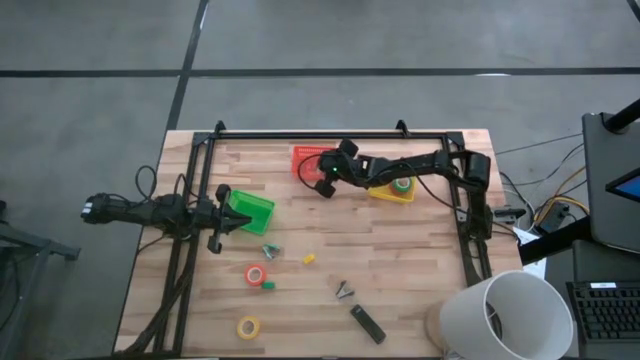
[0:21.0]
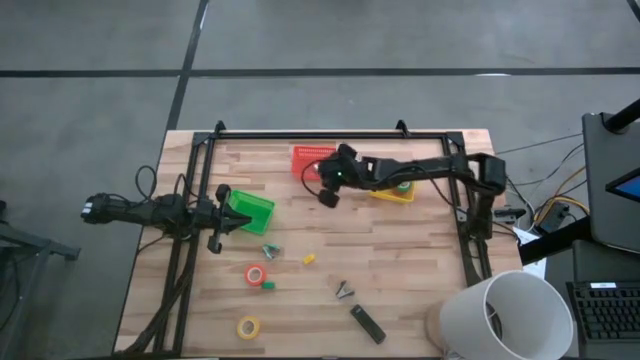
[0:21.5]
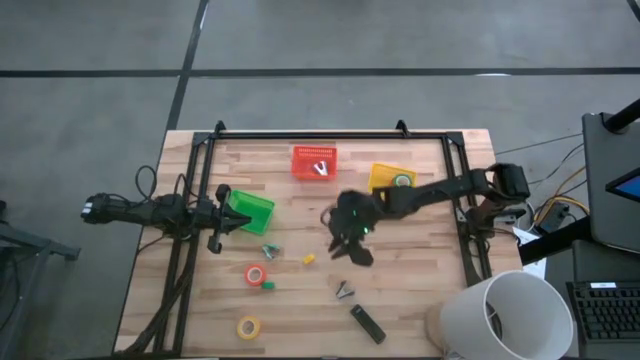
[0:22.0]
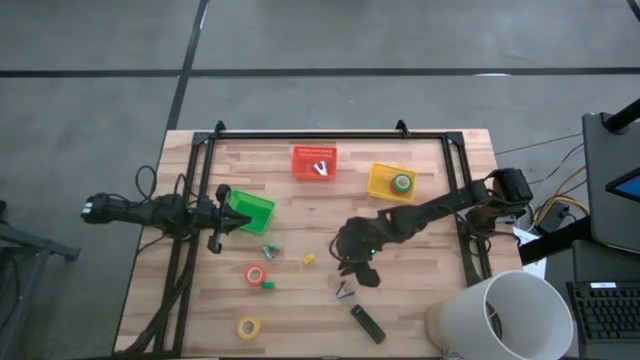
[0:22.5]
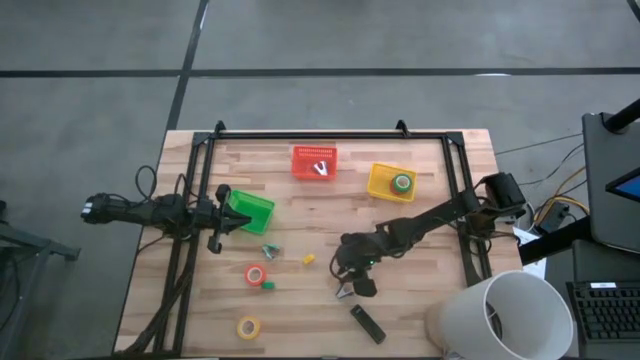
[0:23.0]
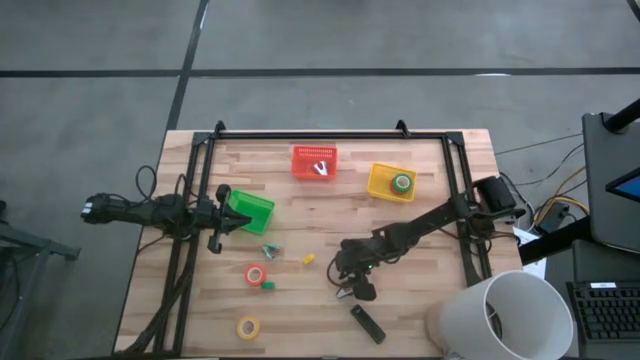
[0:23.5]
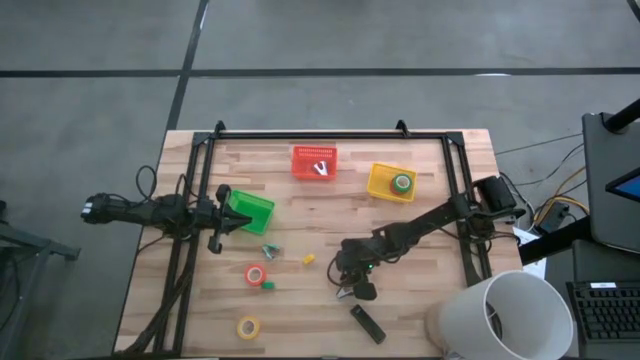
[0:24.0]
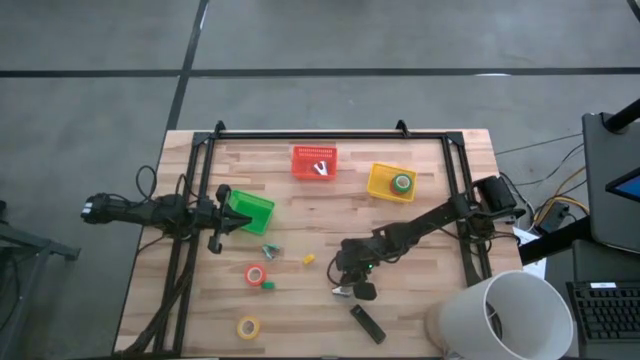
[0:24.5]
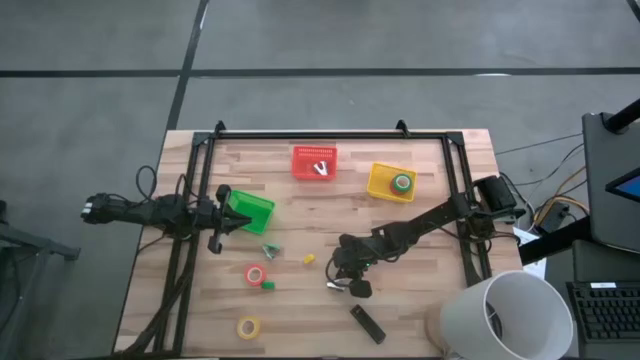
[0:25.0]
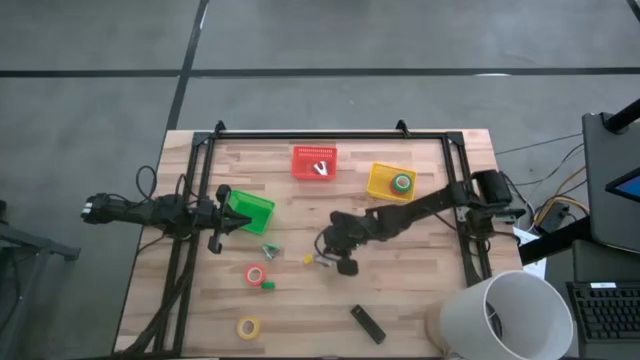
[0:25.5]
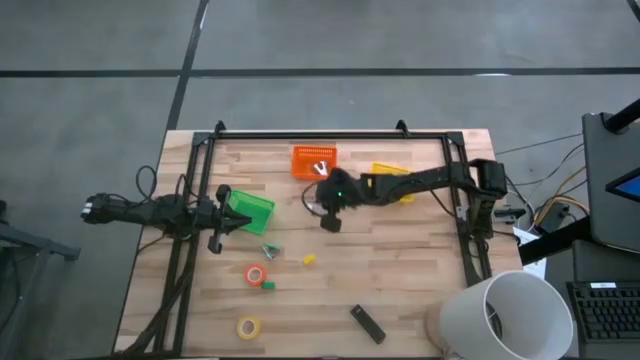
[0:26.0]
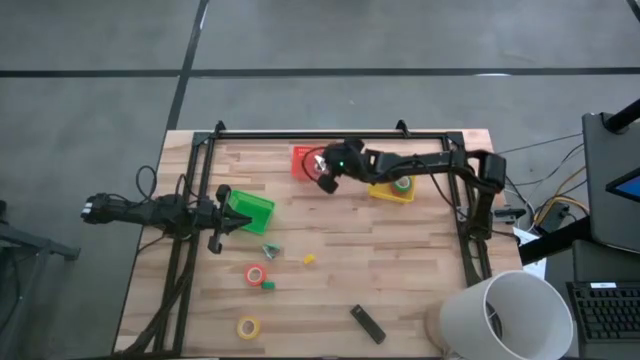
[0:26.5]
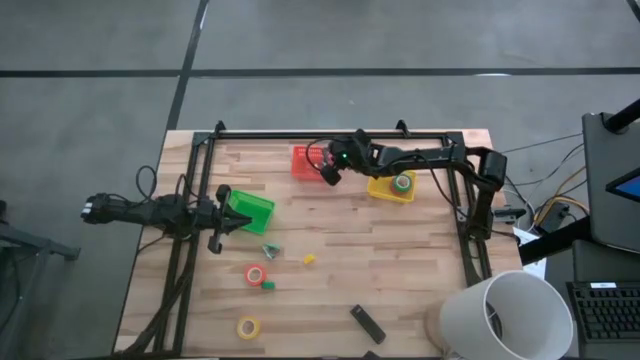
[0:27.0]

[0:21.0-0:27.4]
Task: Pick and place Stapler, Stapler remover, tape
Put the black staple remover into the orange basket

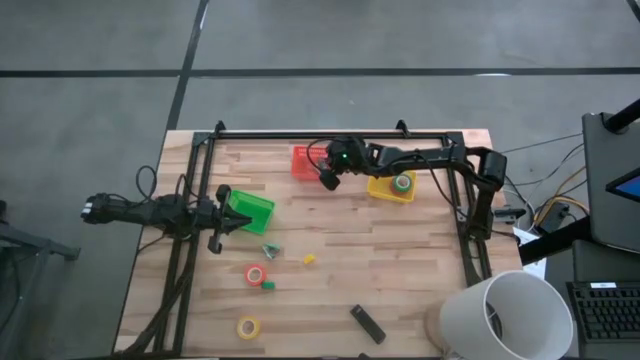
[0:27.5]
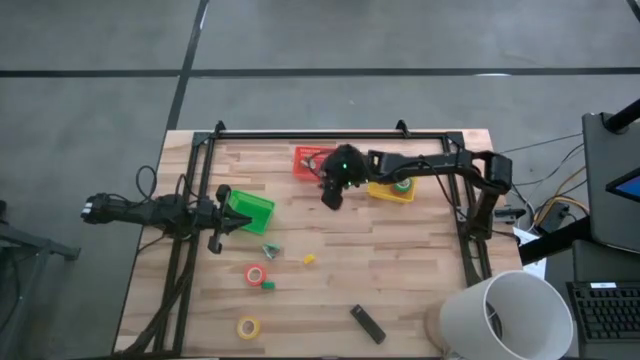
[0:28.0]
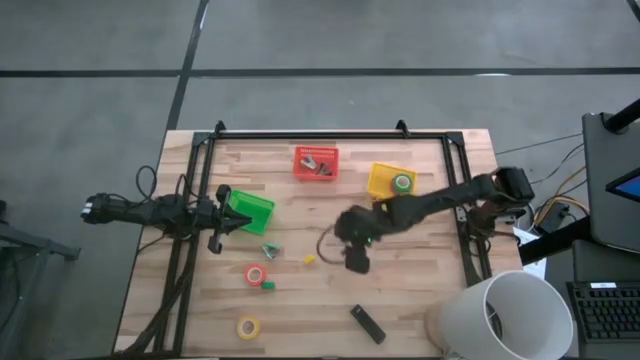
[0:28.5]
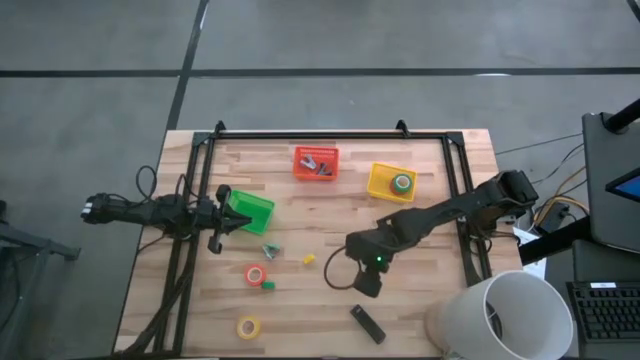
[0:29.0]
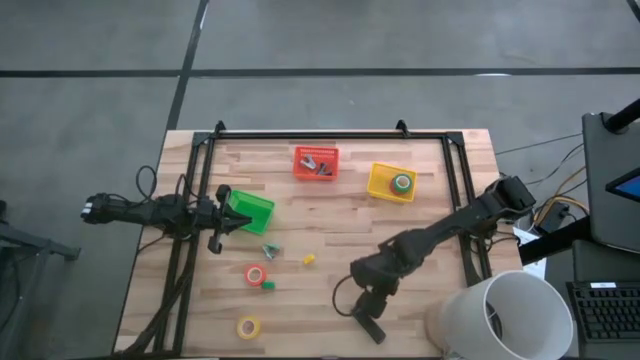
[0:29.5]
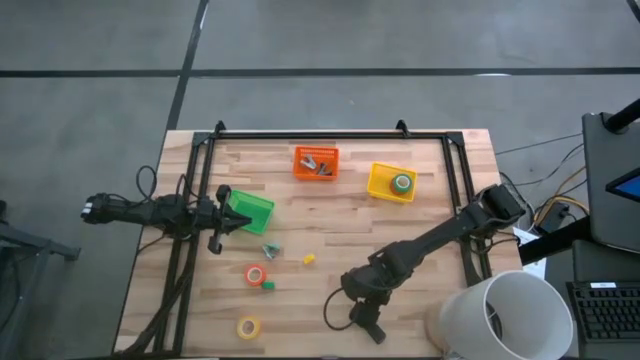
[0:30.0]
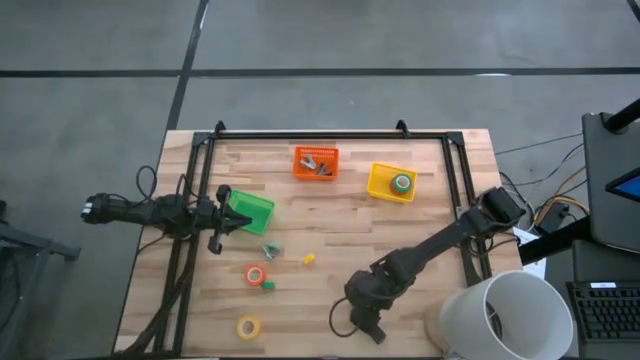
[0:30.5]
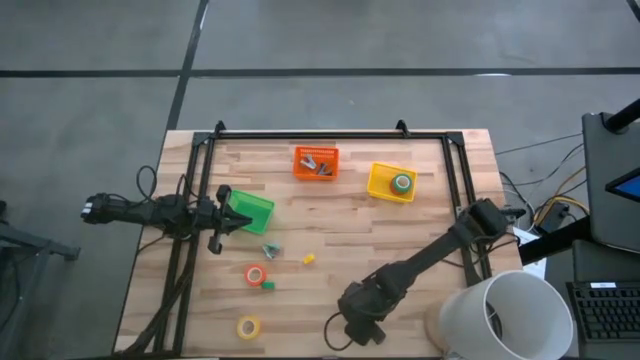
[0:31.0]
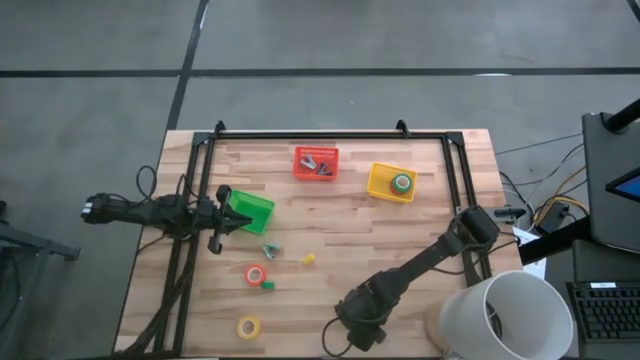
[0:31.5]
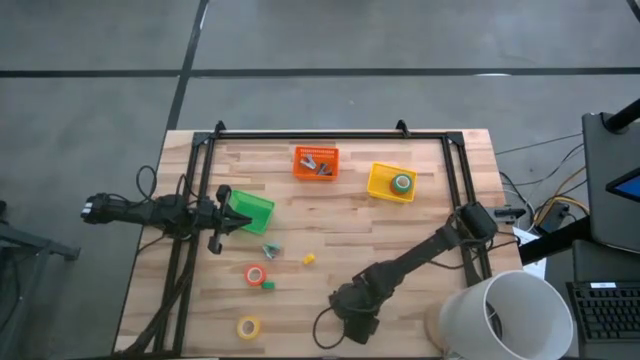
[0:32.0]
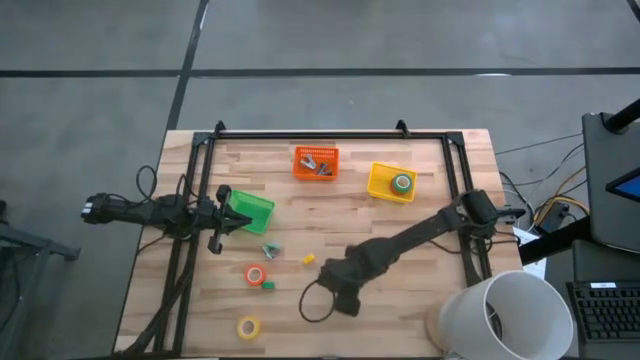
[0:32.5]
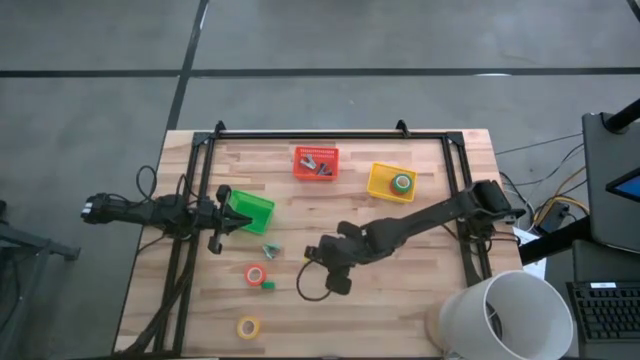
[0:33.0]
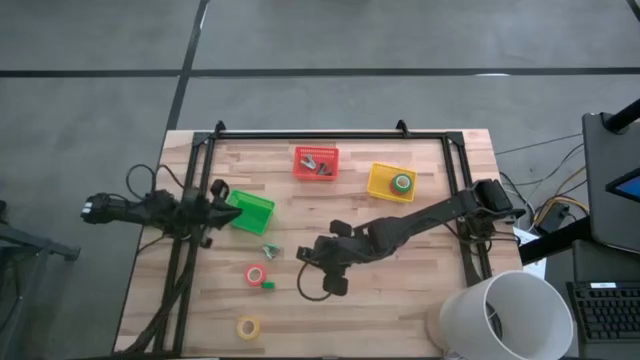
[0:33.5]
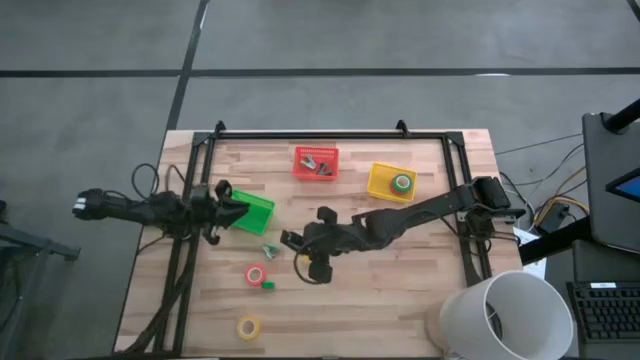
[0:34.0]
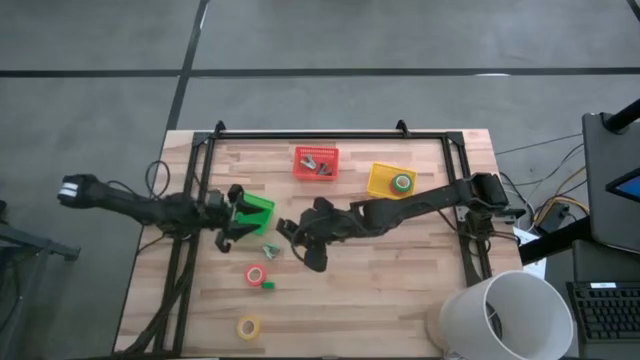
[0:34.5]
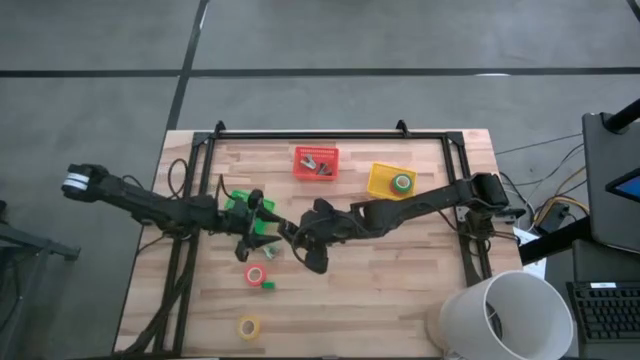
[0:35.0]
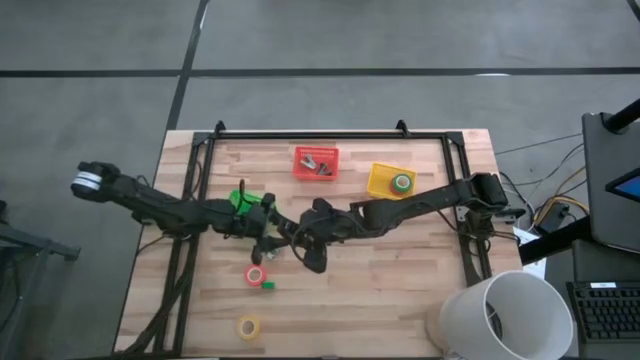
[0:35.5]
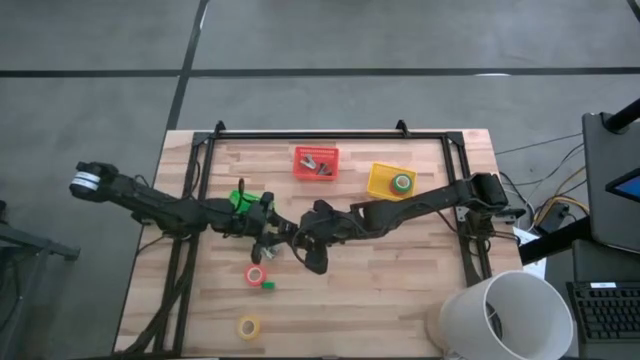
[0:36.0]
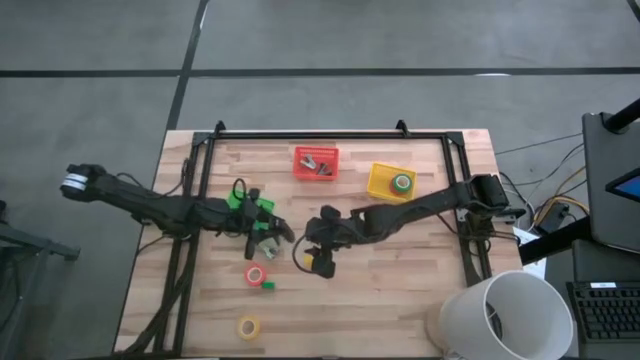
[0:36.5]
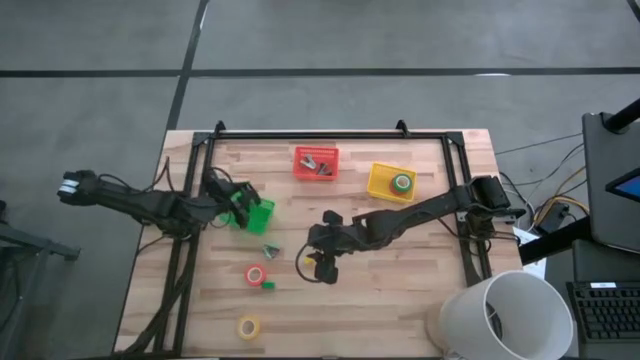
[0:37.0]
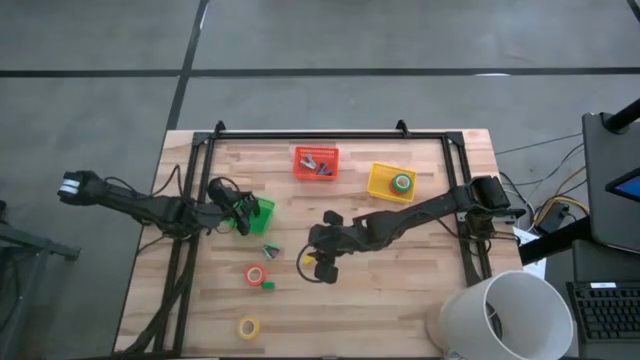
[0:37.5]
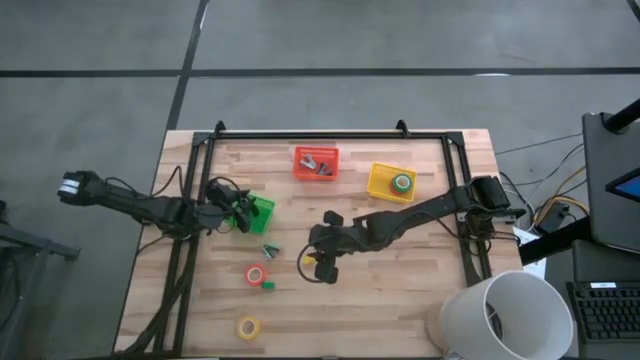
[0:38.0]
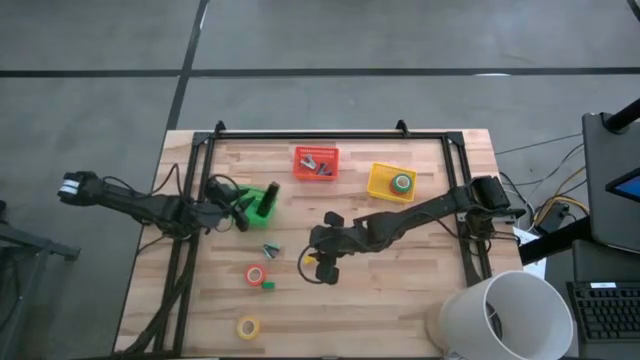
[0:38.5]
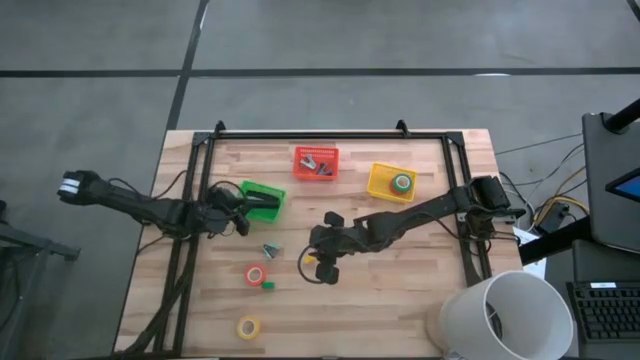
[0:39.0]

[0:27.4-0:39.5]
Put the black stapler into the green basket

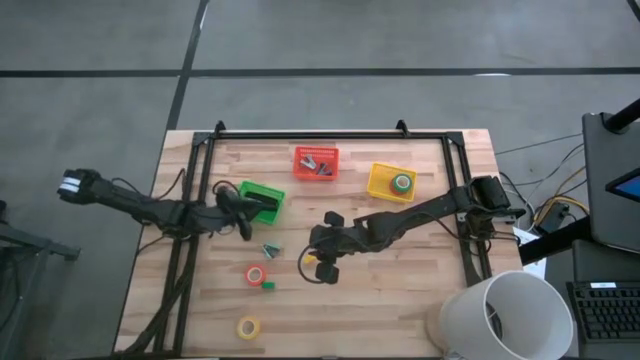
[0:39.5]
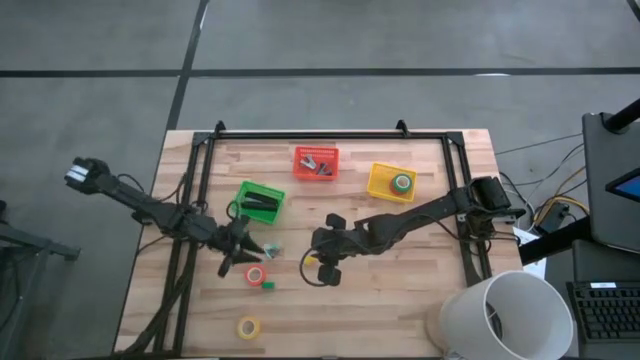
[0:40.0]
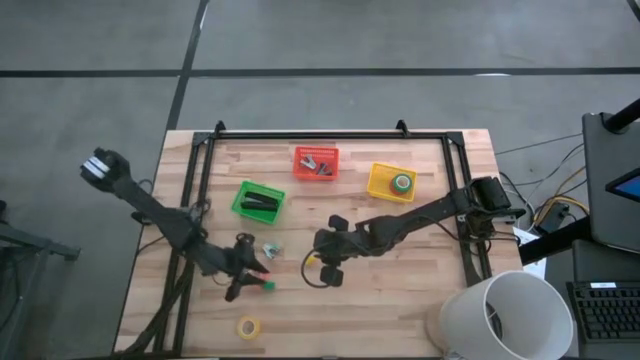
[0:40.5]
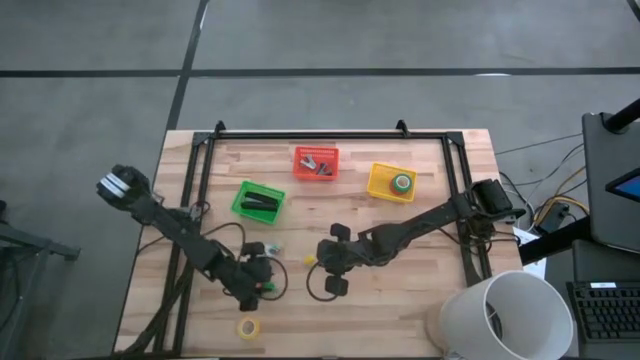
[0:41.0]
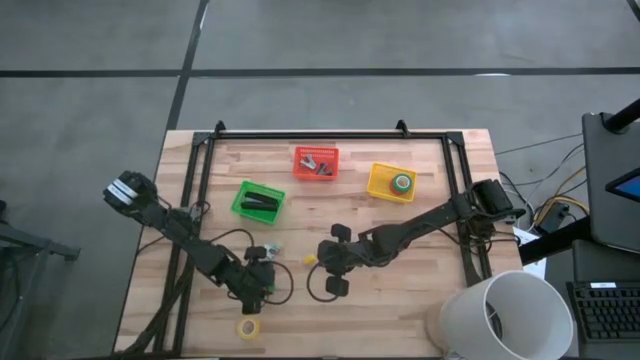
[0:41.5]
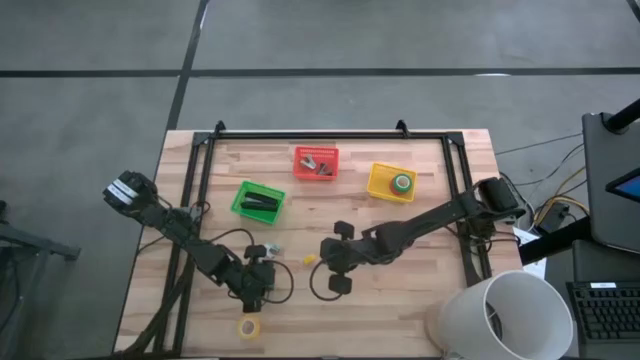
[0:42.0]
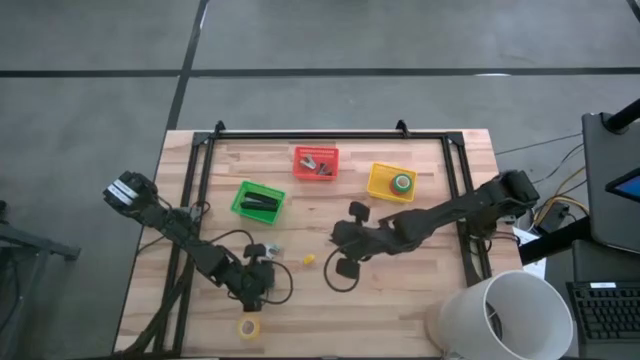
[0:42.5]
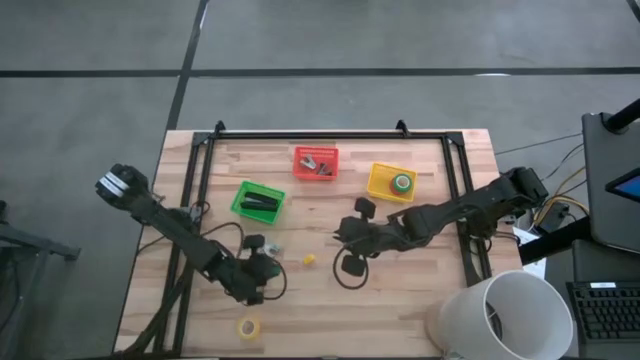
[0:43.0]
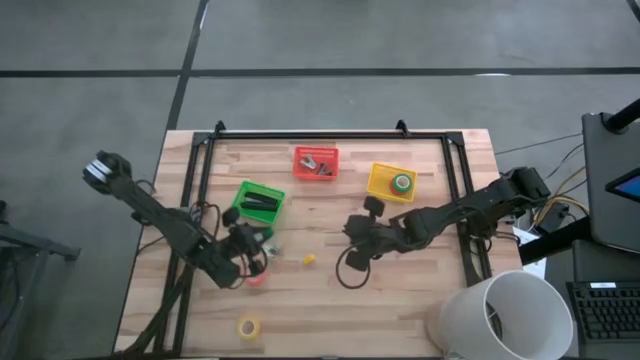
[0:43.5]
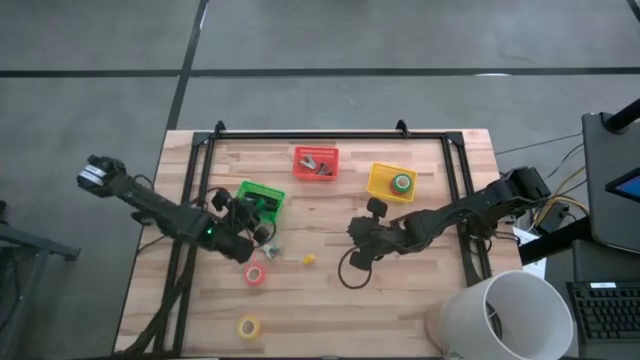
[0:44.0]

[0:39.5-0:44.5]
Put the green stapler into the green basket
